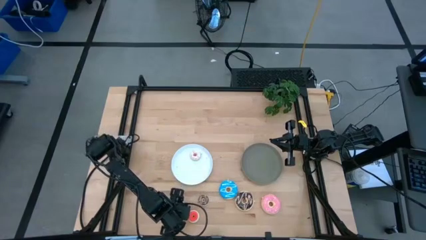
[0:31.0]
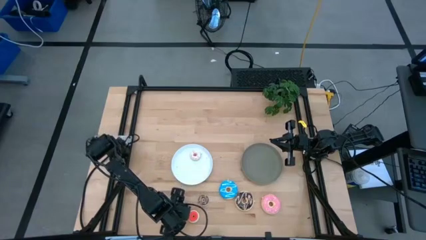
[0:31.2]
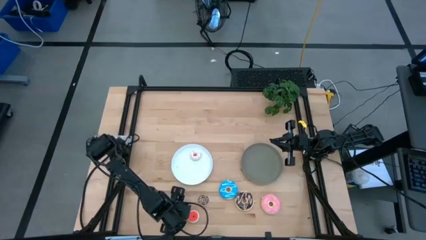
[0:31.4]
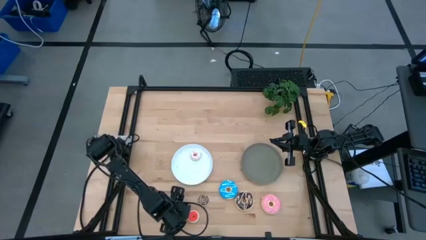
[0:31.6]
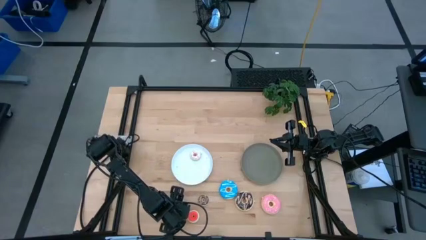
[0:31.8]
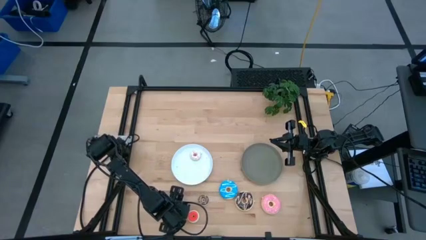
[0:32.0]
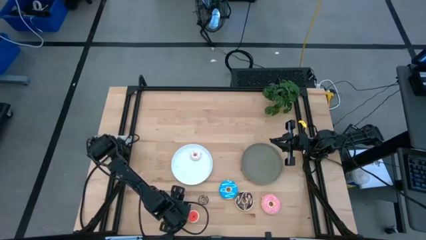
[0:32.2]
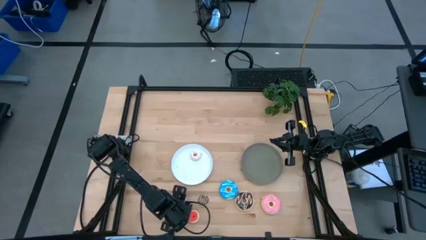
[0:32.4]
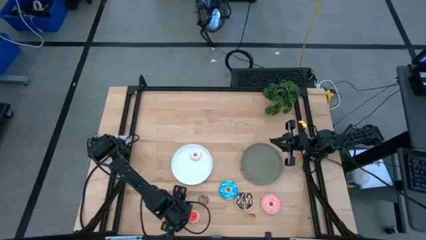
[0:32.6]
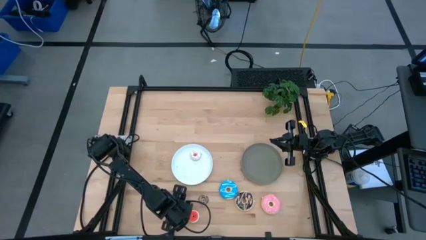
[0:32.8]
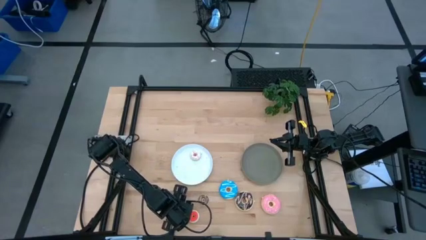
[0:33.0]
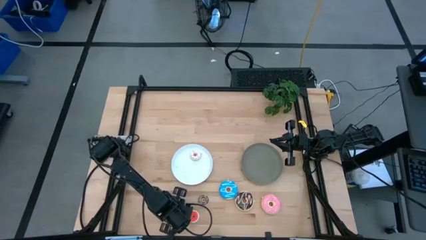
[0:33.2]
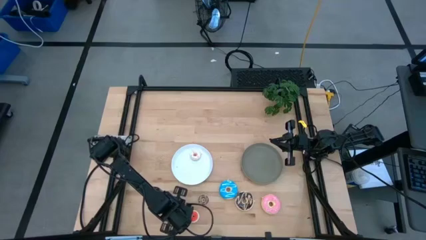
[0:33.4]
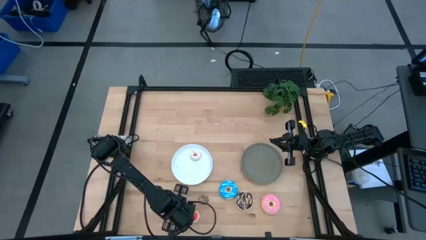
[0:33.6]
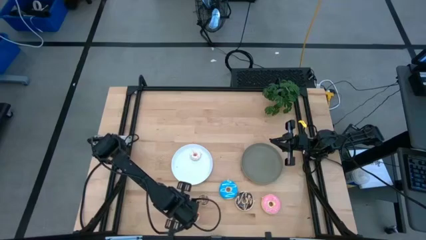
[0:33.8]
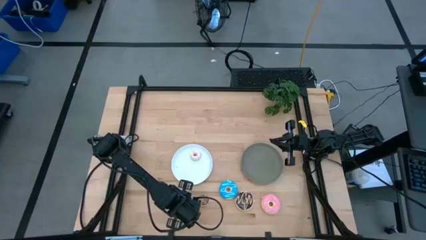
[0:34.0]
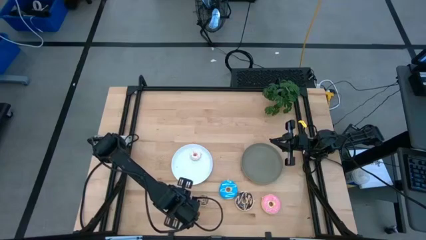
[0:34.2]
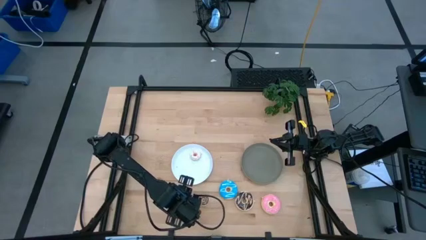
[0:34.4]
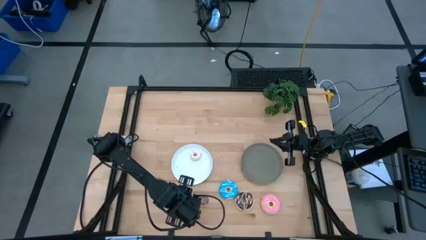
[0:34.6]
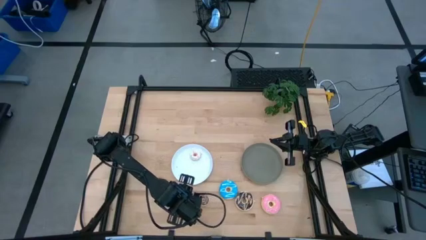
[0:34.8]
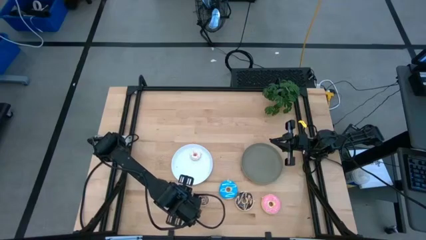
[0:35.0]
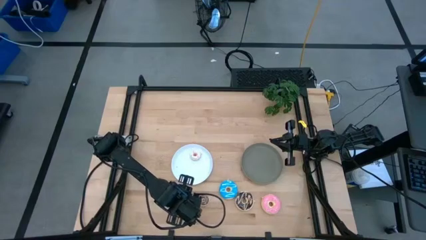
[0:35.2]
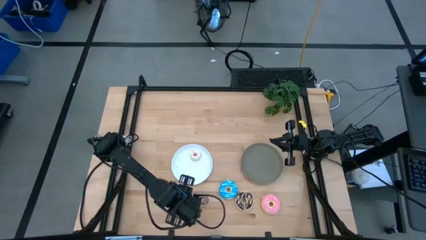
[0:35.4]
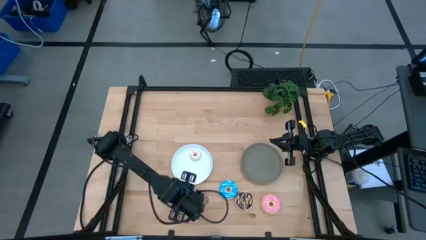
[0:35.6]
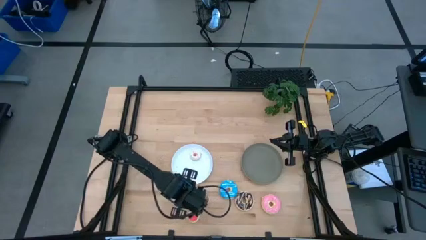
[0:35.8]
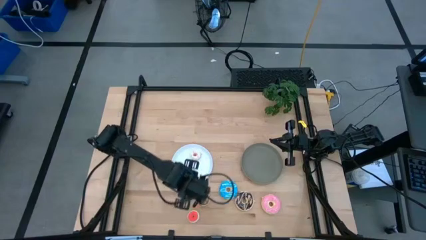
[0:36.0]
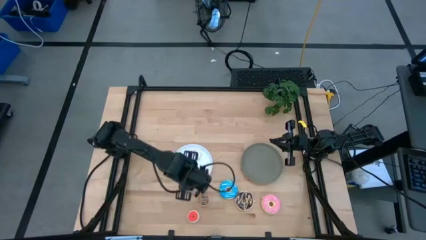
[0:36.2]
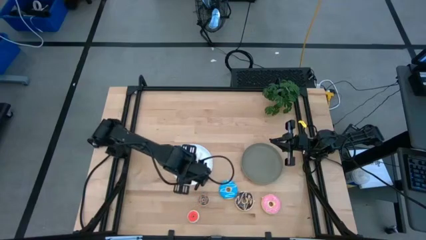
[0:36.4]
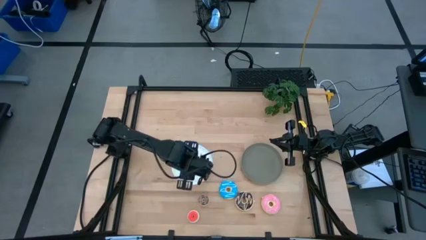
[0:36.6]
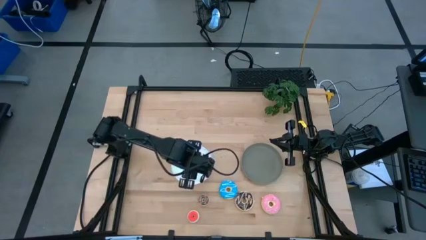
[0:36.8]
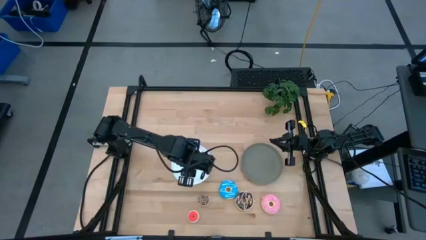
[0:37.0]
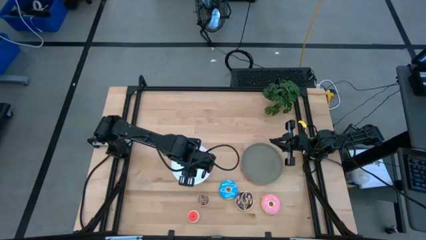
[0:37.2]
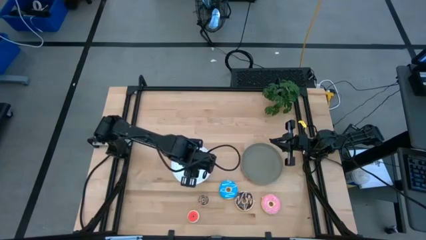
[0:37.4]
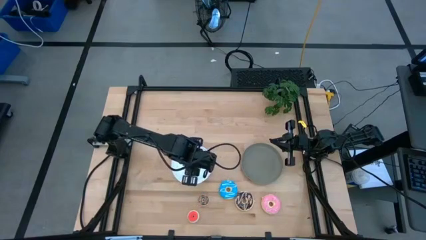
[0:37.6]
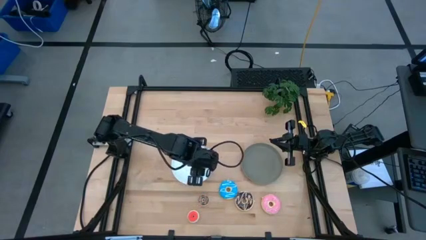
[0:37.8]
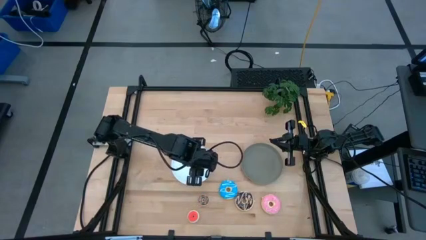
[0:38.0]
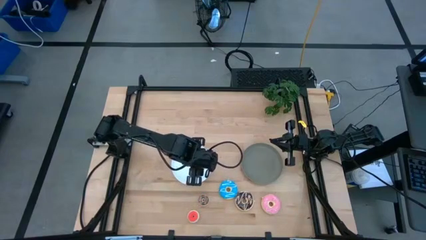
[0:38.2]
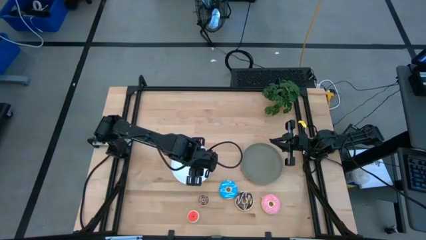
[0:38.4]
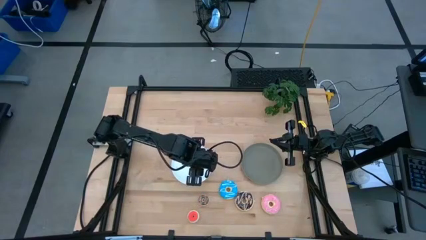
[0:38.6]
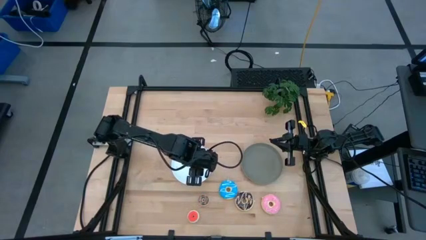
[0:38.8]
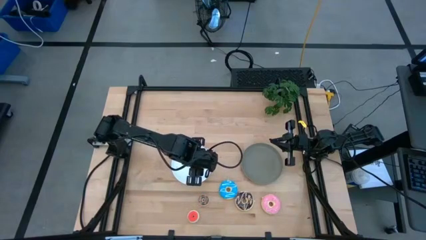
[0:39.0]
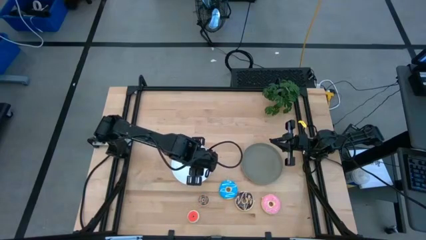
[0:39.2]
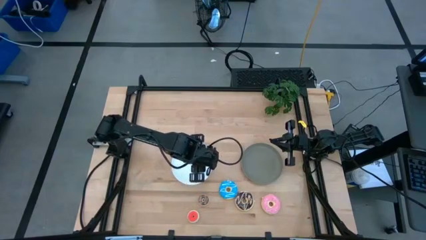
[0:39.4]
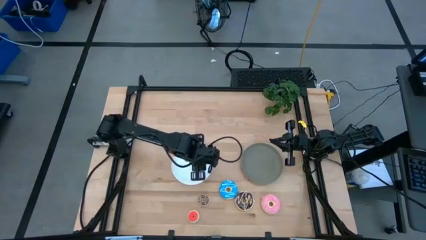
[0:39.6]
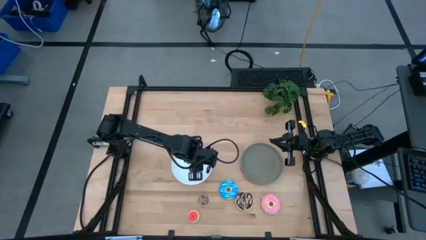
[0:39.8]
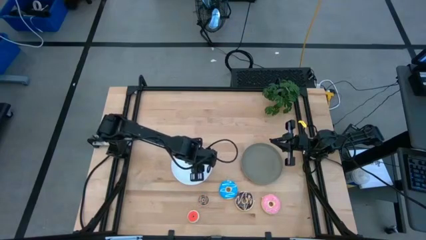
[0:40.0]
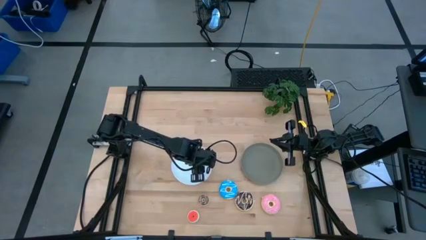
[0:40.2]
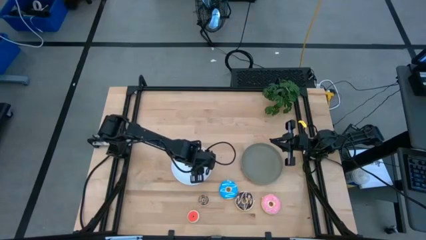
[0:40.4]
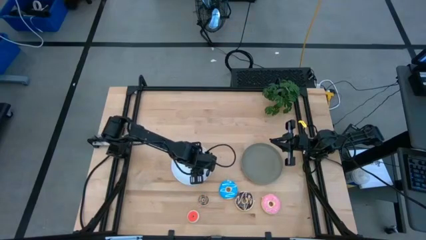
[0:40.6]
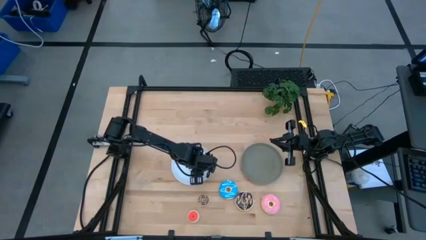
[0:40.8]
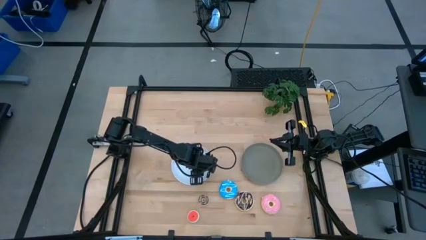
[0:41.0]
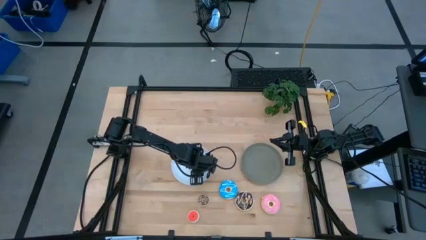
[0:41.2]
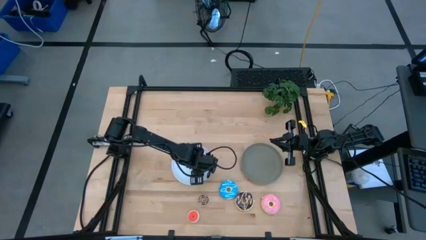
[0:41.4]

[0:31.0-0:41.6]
Task: Pick & Place donuts
Put the small blue donut on the white plate

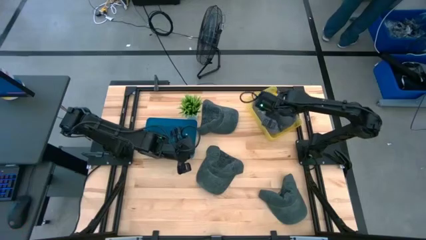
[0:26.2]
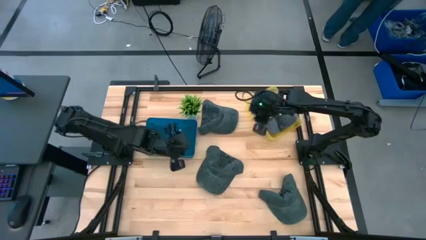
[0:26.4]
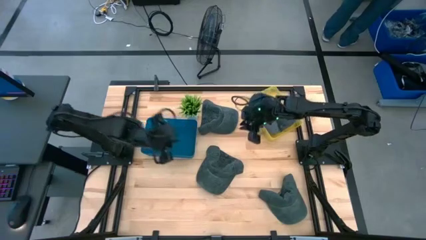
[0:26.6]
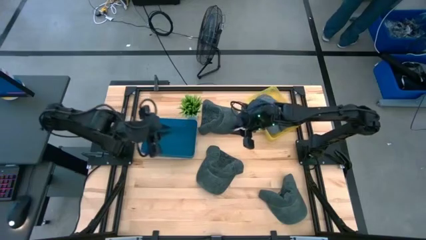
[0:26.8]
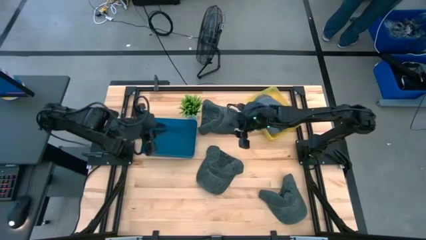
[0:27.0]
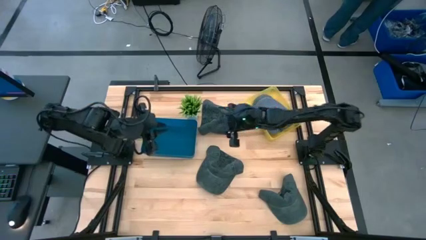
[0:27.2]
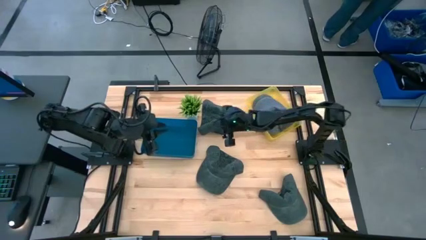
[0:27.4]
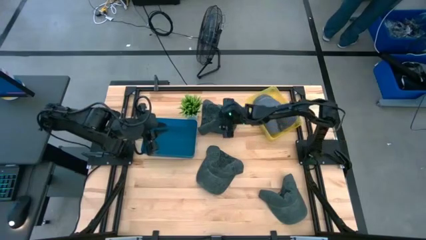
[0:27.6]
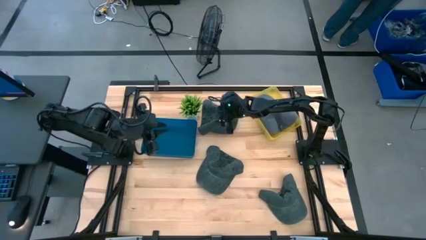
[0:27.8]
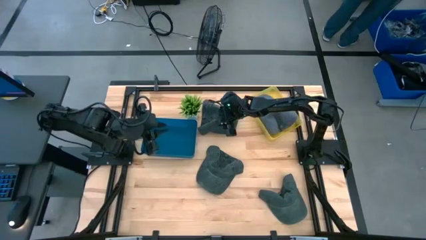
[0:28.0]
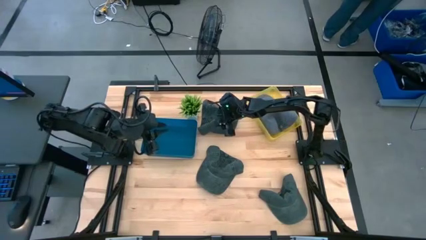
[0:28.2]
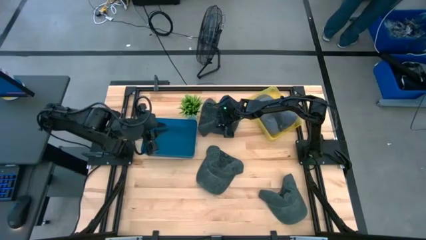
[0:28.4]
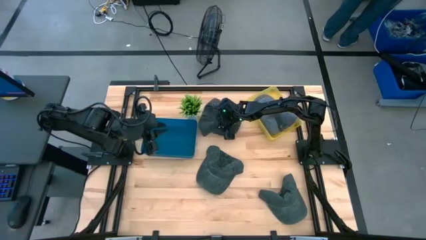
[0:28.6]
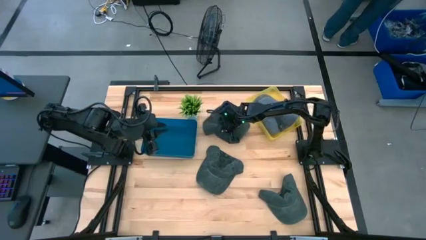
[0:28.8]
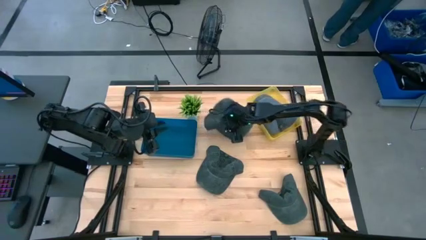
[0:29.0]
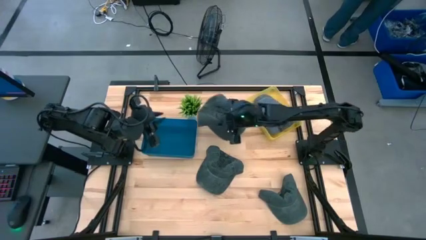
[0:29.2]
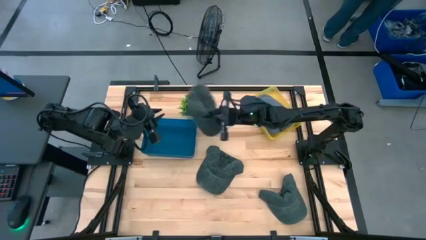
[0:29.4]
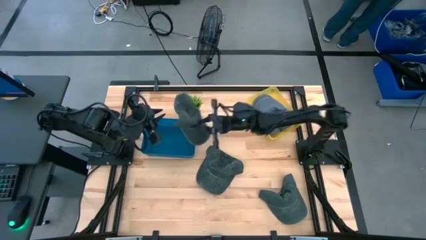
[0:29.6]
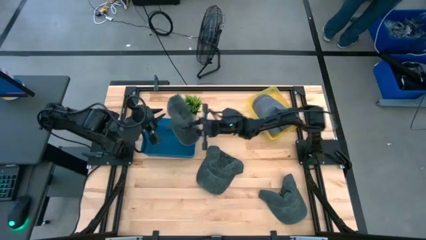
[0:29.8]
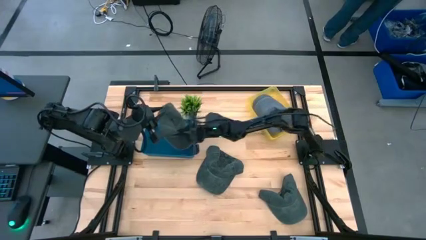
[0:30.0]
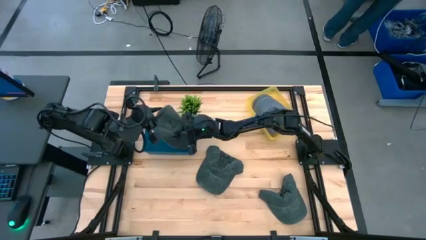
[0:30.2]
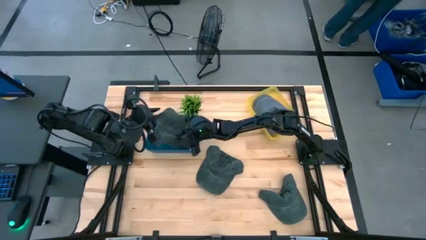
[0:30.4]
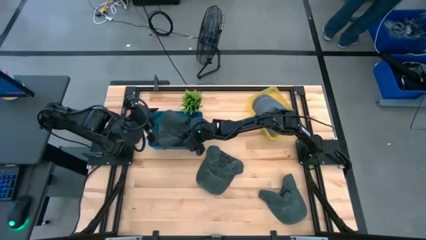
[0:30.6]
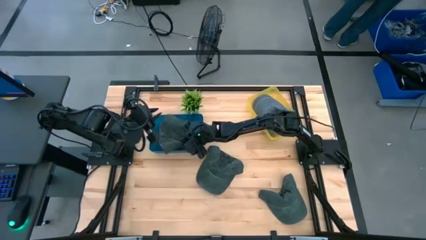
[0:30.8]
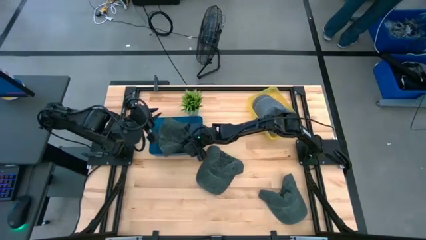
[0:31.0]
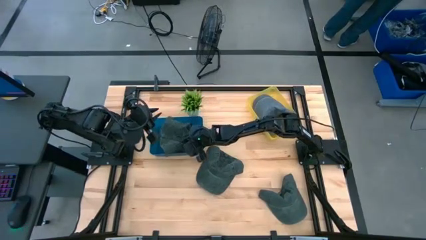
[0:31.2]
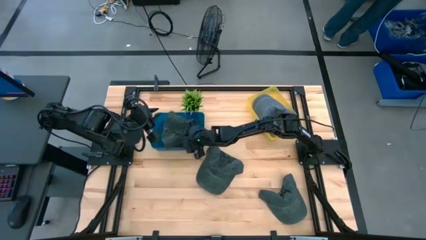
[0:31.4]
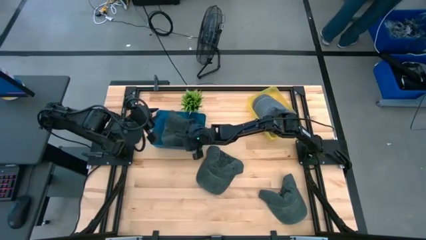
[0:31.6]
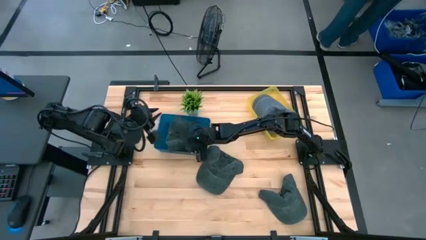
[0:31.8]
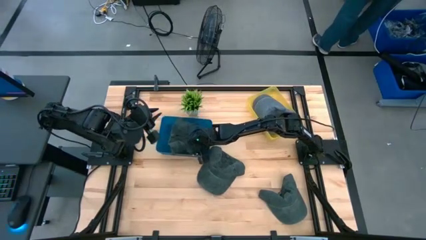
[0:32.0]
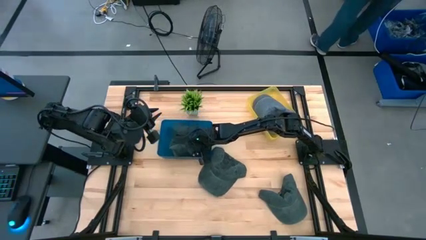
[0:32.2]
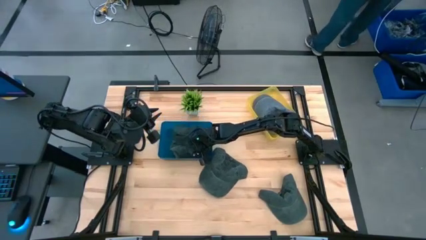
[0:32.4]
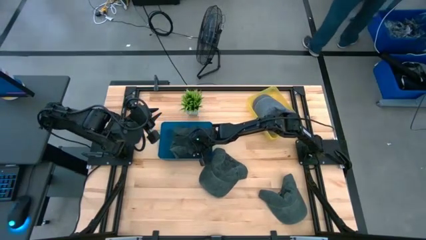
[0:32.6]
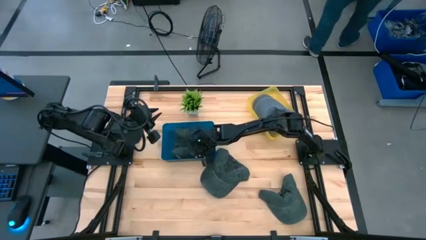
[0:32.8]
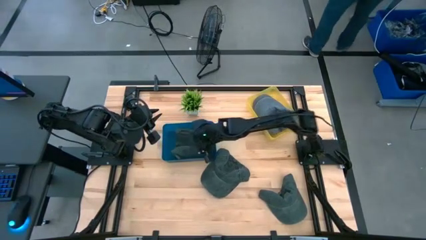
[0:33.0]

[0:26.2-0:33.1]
Task: Pick & Place hat
Put the top black cap into the blue bin
